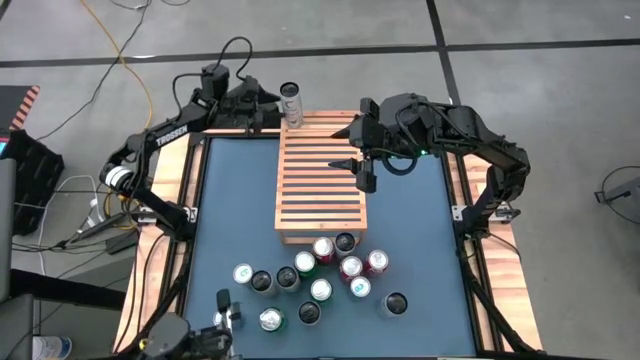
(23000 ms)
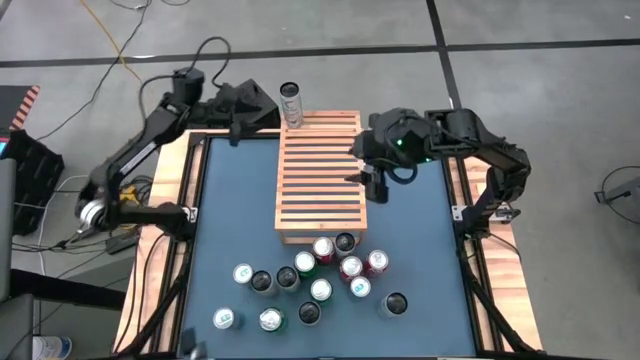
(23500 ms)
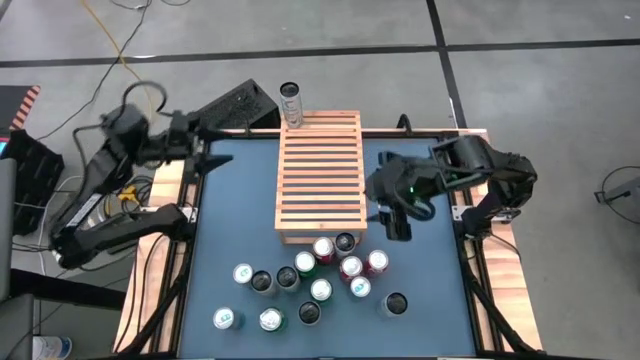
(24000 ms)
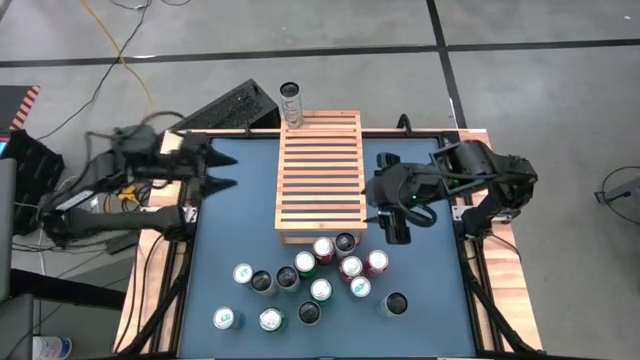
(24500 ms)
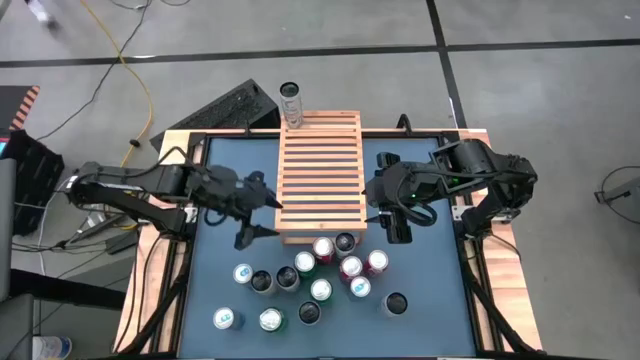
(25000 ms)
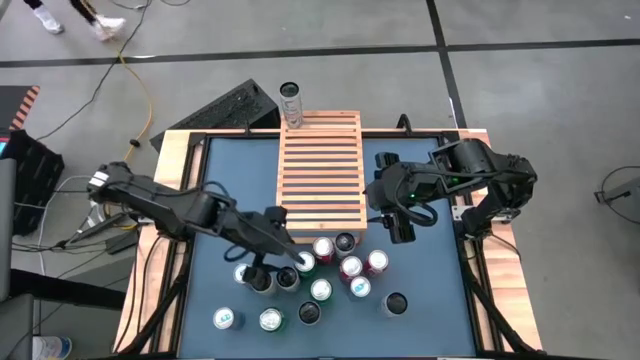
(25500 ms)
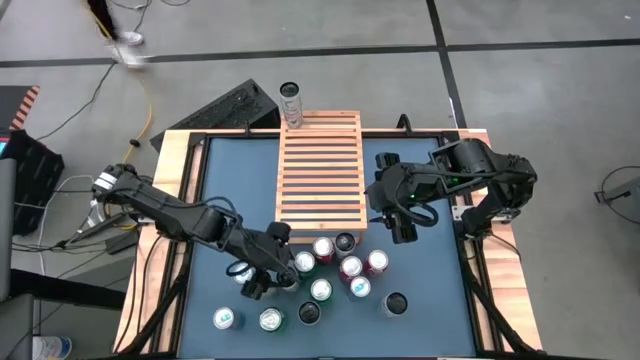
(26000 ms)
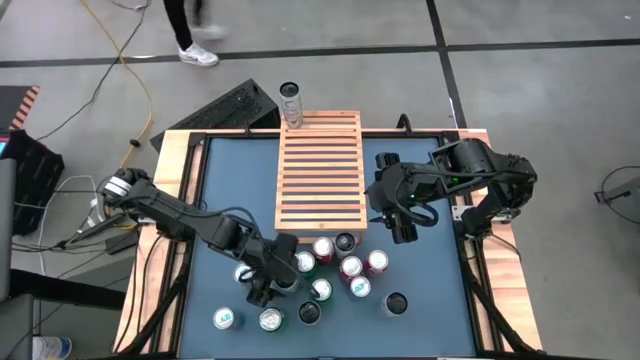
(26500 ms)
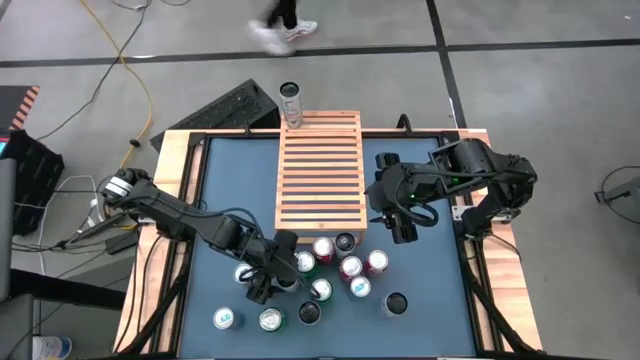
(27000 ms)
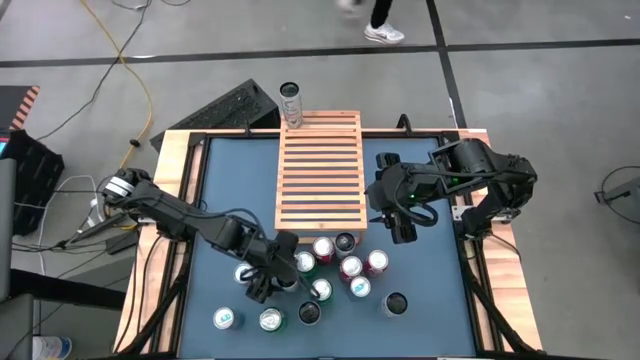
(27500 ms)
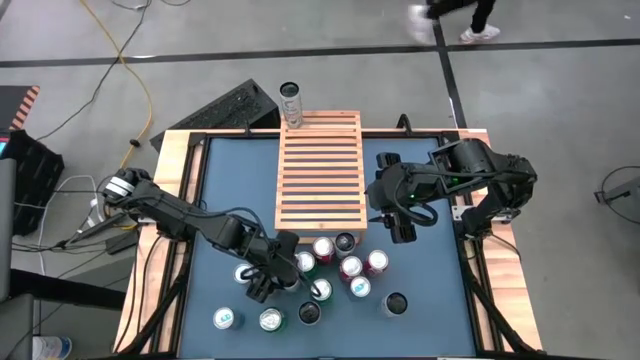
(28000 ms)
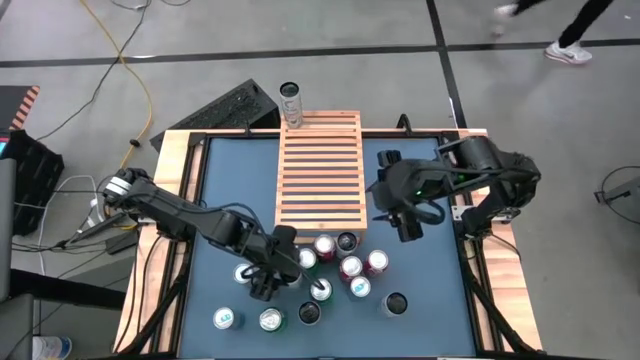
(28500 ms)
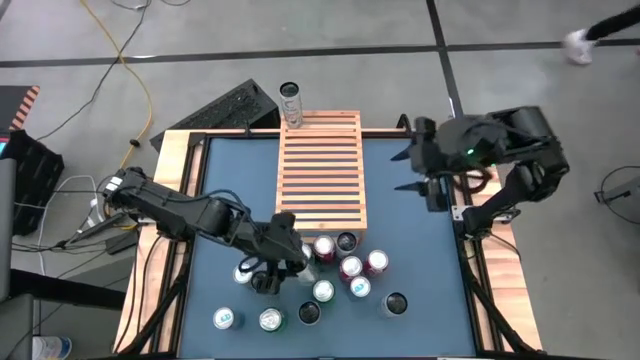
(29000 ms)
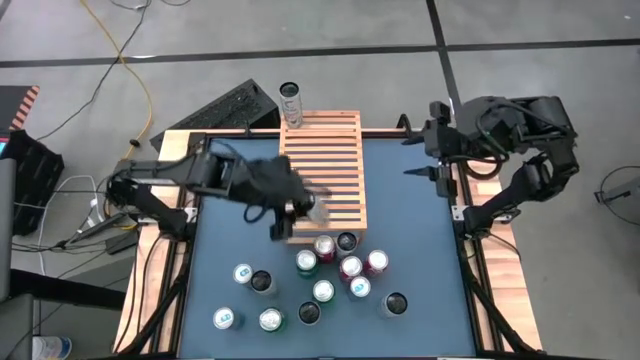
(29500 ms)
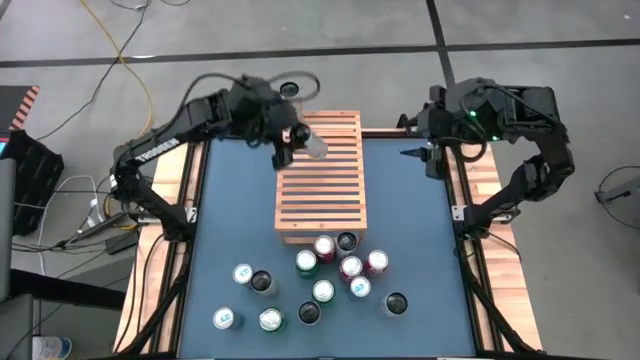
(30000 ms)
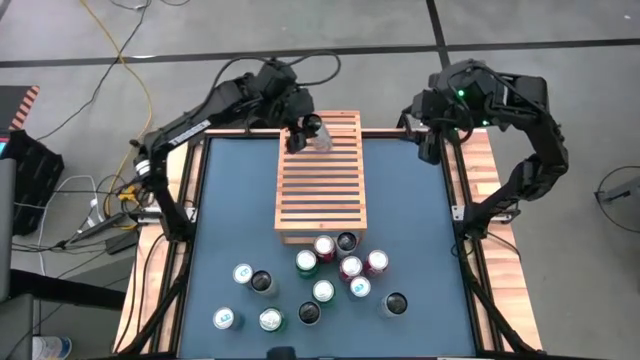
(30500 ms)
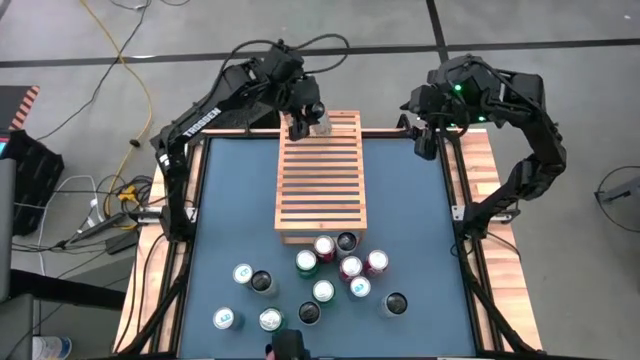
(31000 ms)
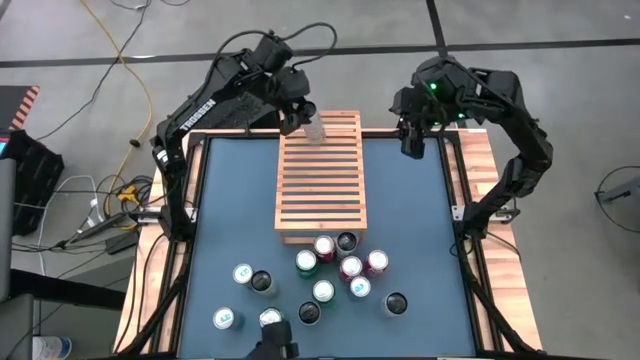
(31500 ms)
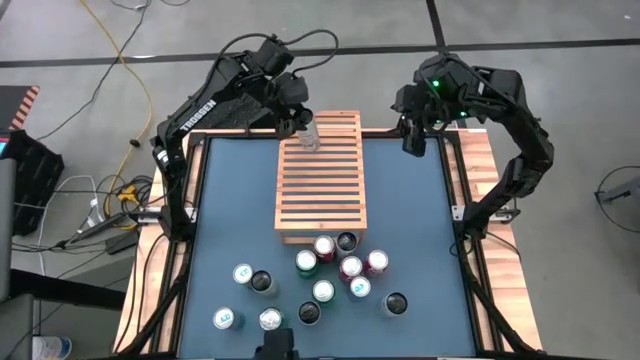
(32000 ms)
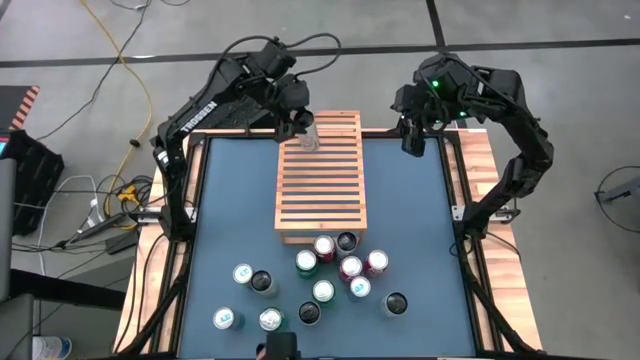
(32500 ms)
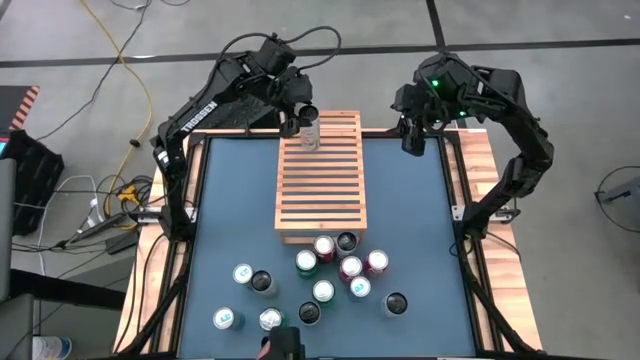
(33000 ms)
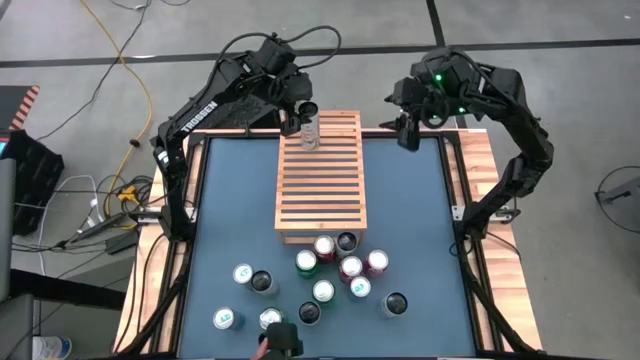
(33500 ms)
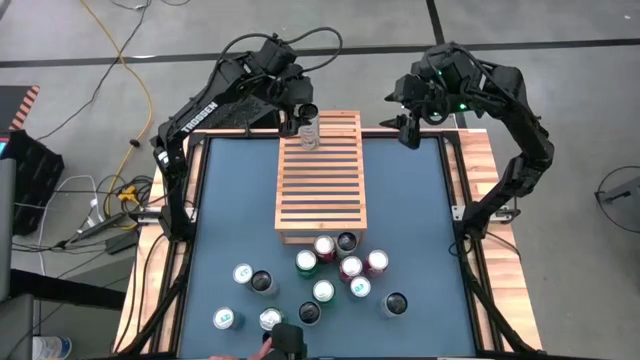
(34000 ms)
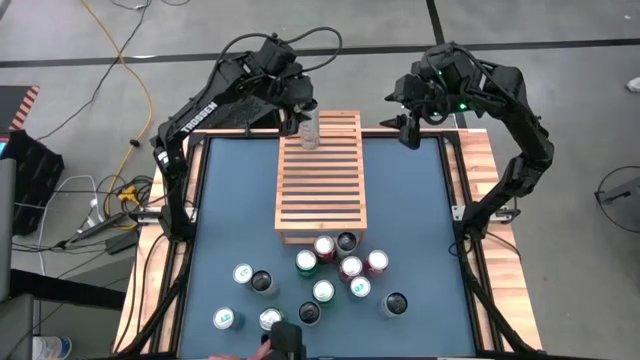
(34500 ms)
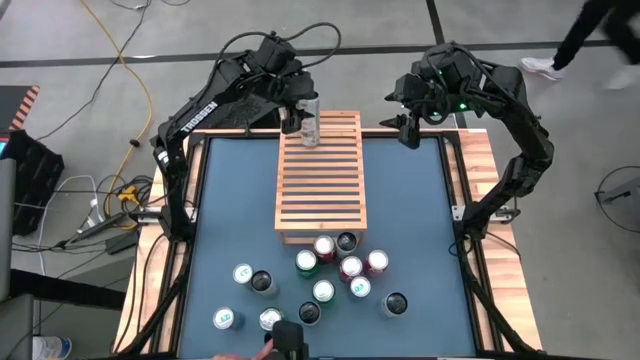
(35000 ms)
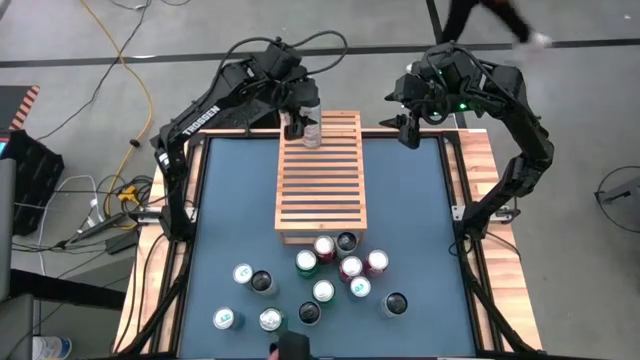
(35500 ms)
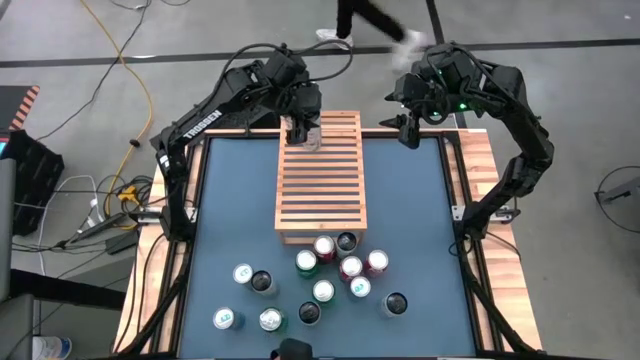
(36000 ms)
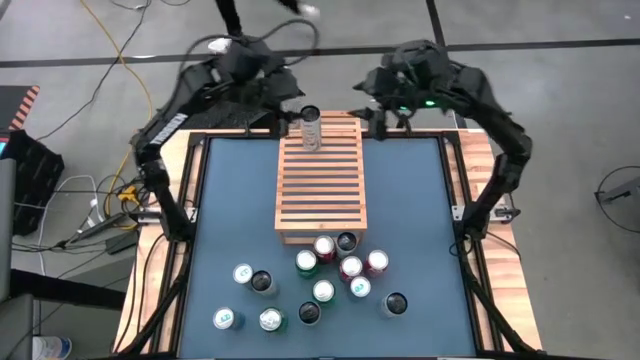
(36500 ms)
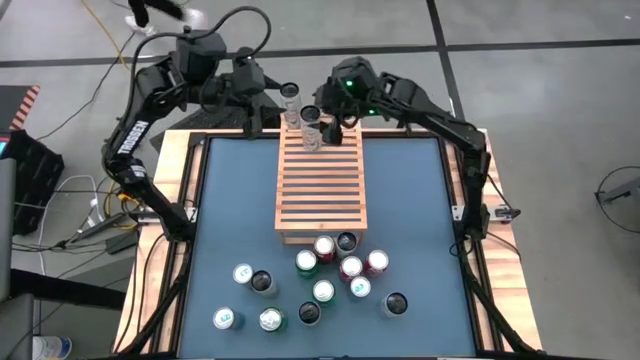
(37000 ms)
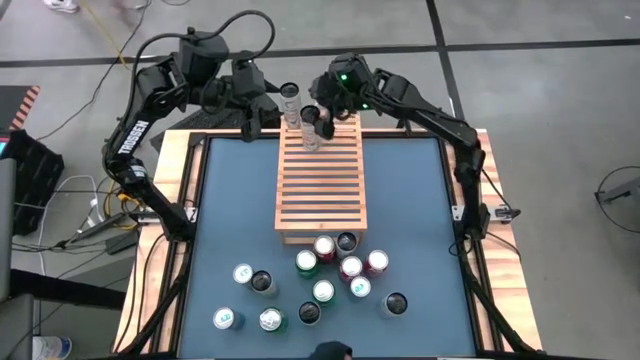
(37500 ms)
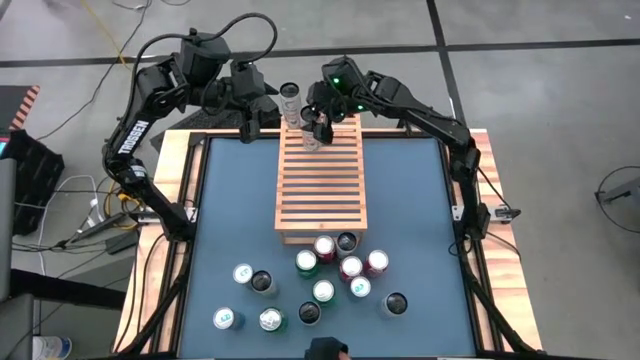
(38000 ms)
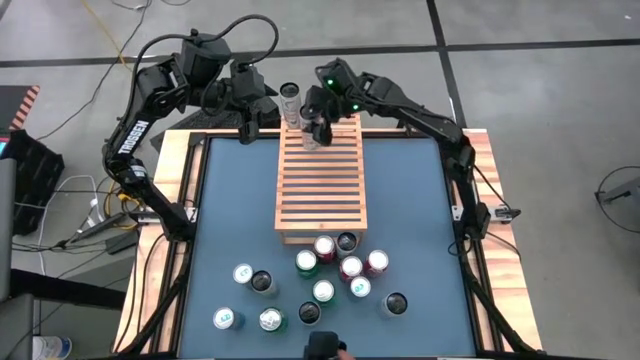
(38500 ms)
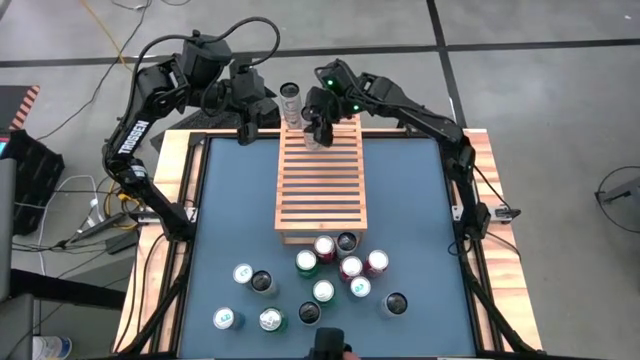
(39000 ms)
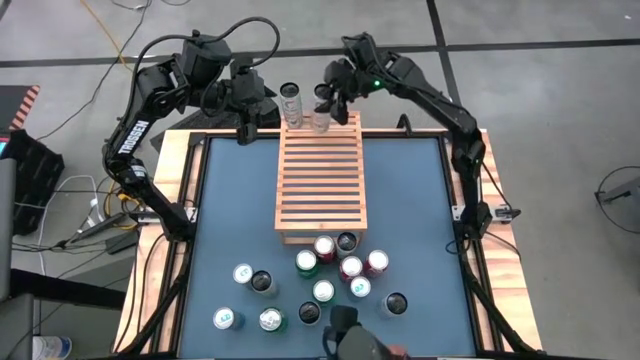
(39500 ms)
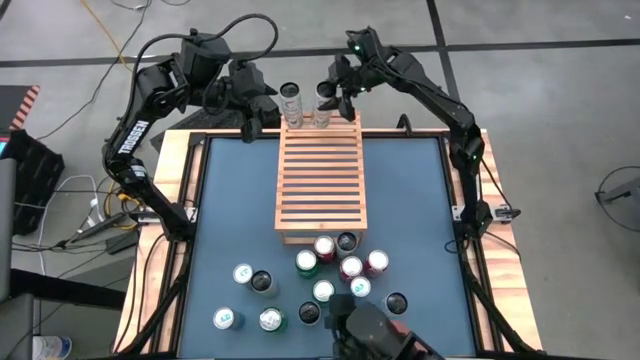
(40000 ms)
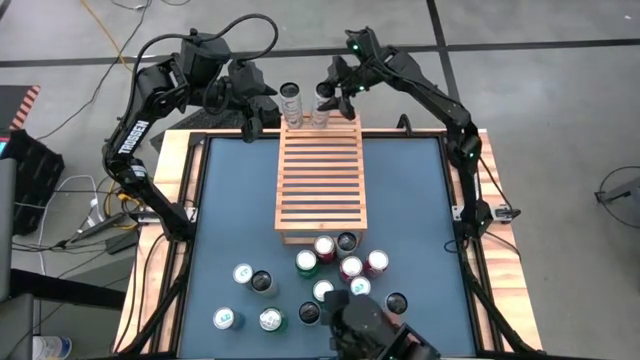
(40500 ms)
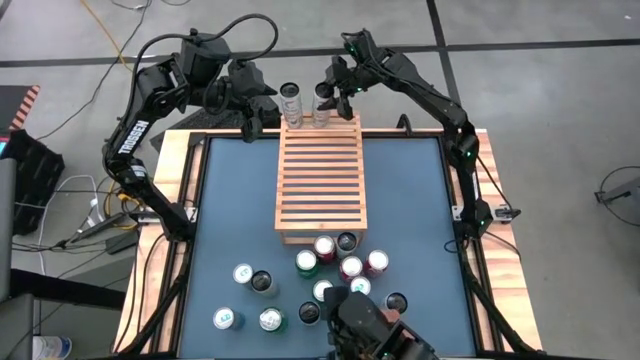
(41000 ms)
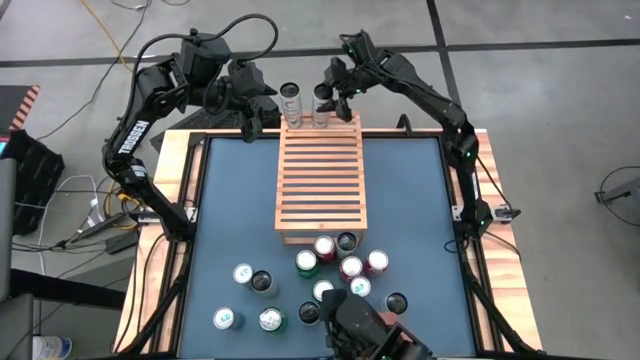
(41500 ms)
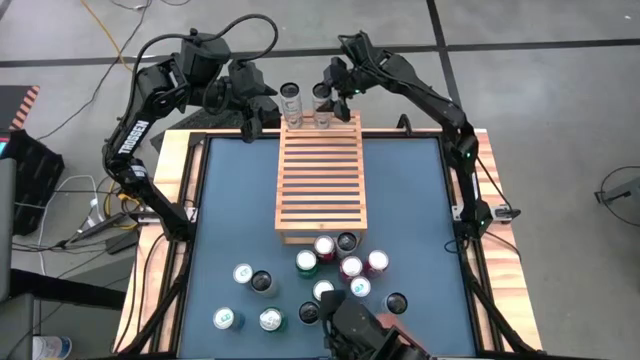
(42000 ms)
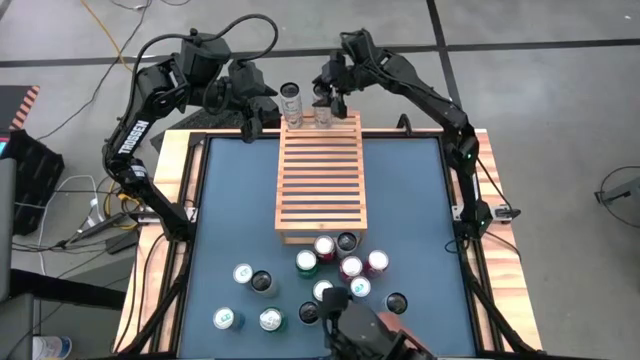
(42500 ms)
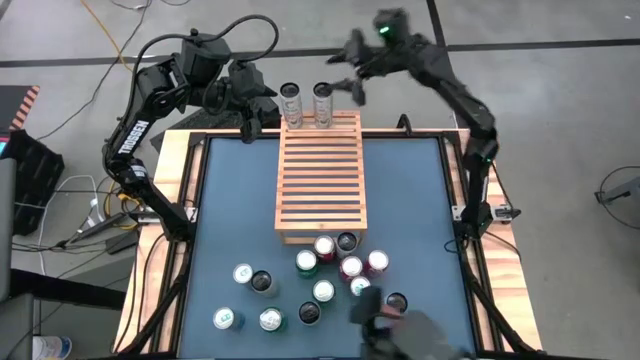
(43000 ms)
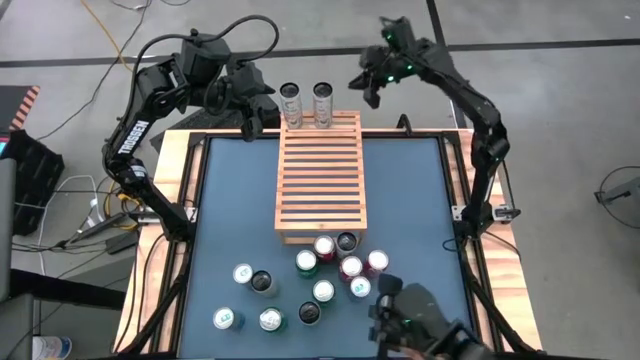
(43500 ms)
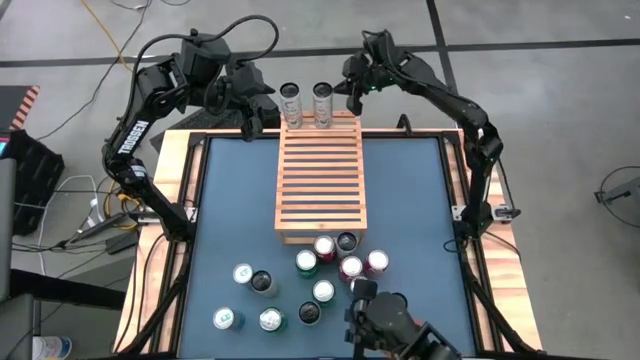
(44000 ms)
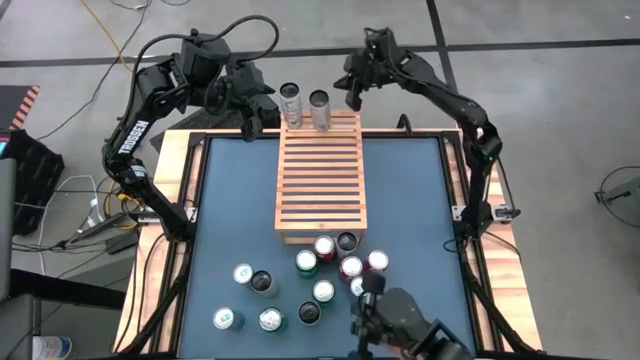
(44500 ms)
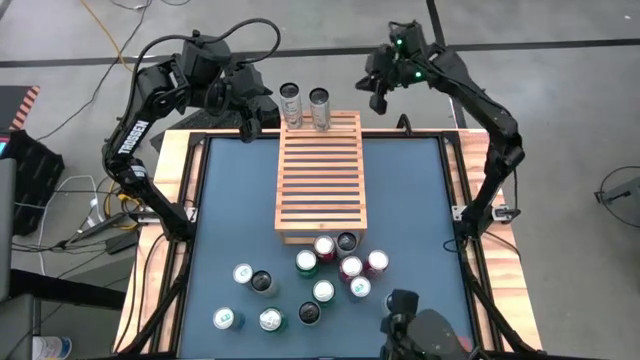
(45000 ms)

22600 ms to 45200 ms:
Task: Place canned beverage on shelf
Put the right white yellow soda can on the shelf aligned with the other white yellow soda can
